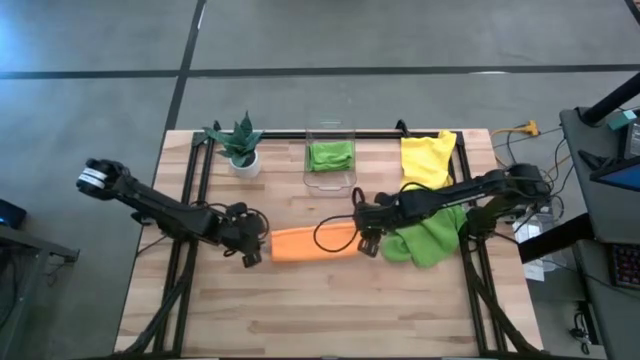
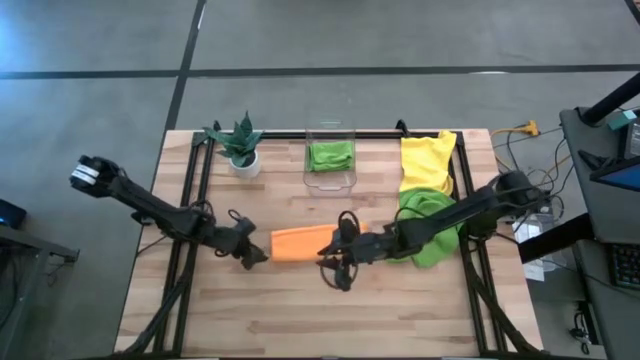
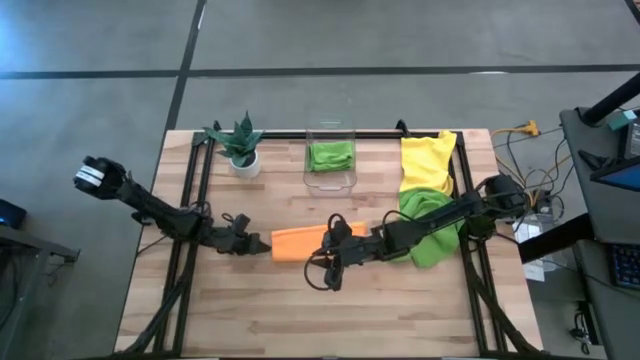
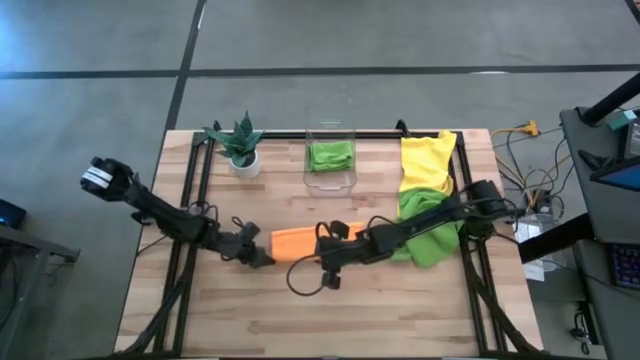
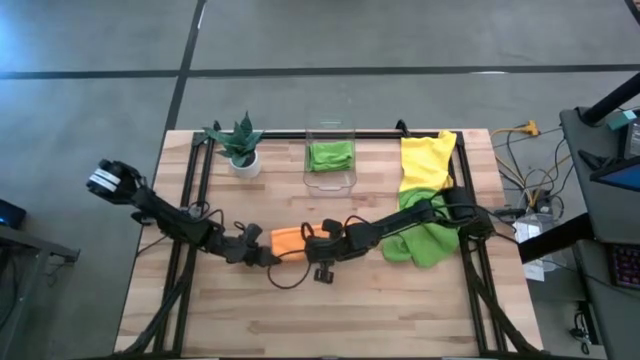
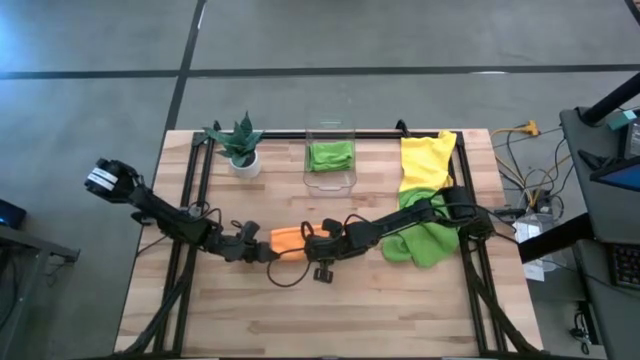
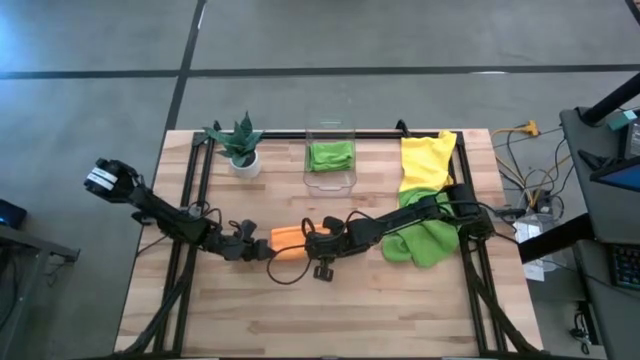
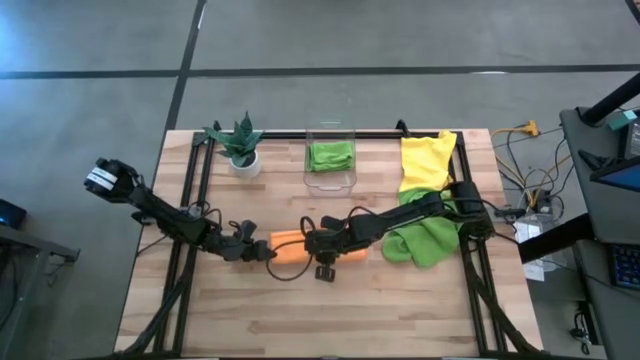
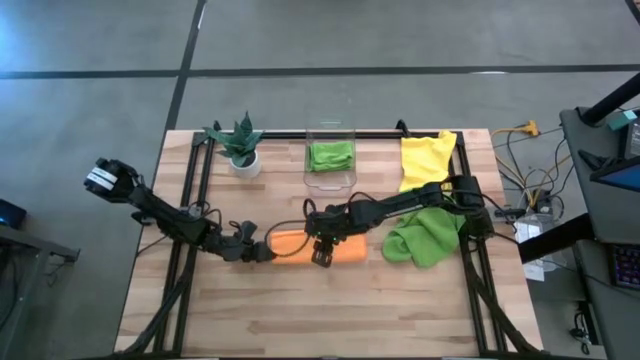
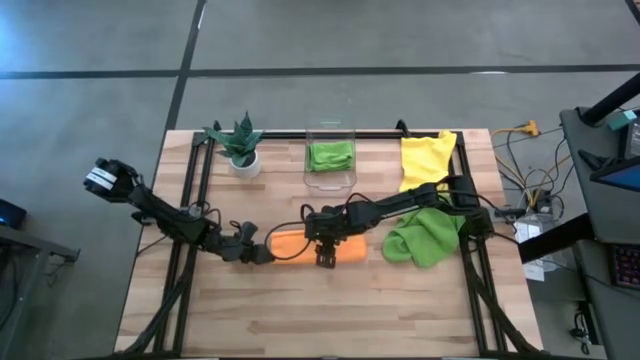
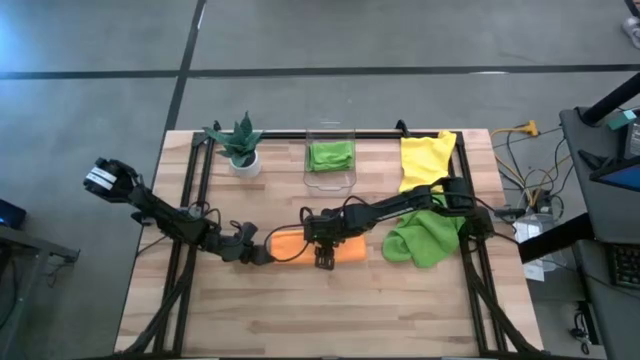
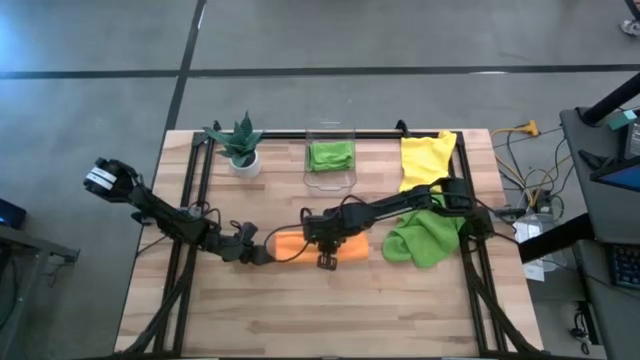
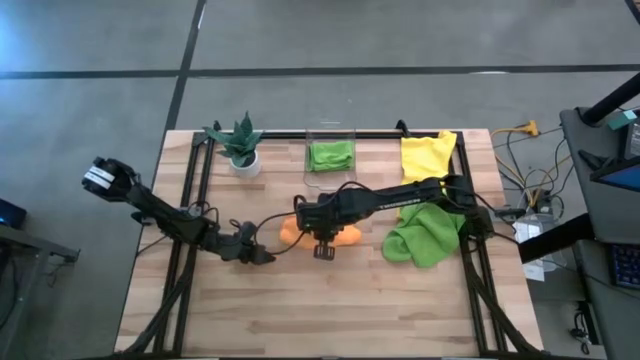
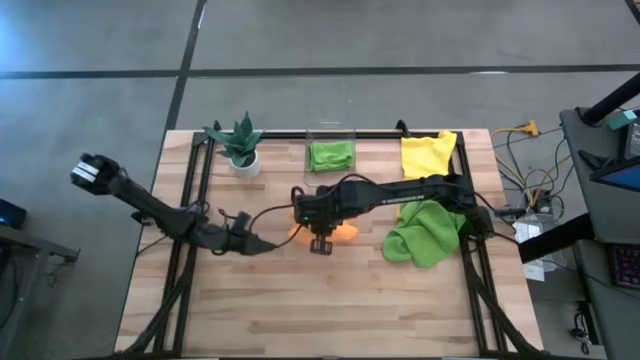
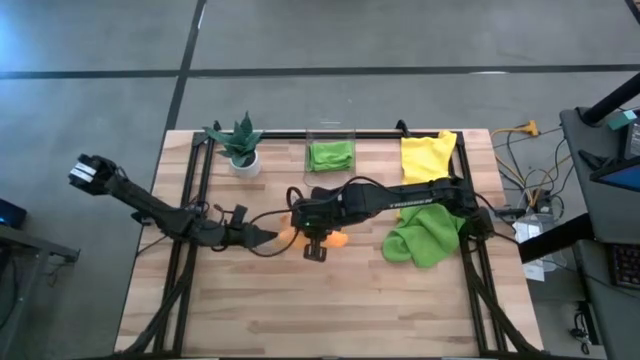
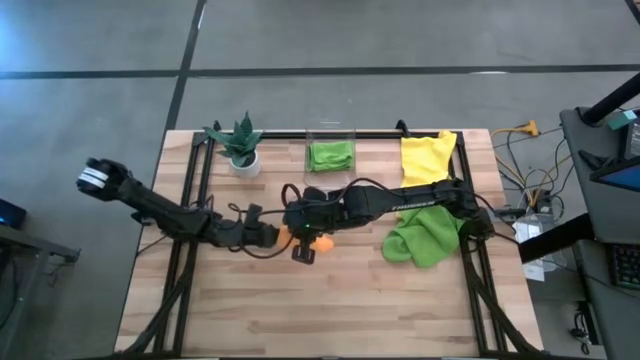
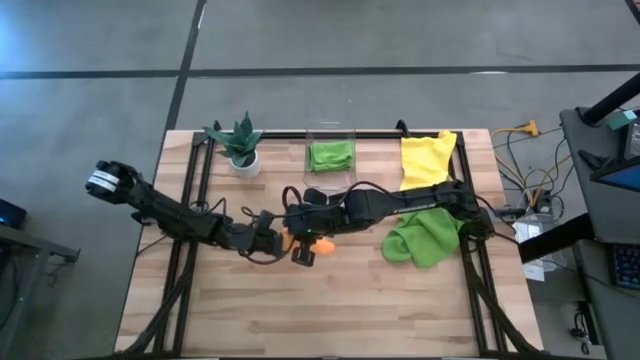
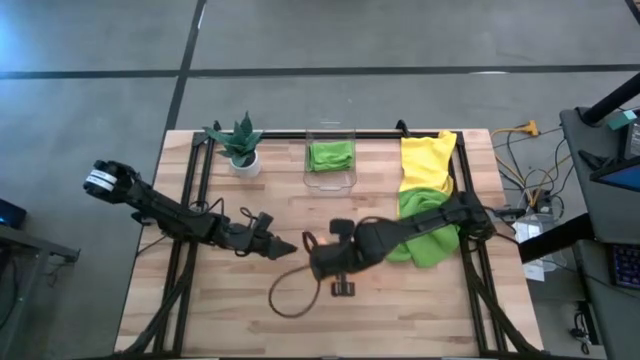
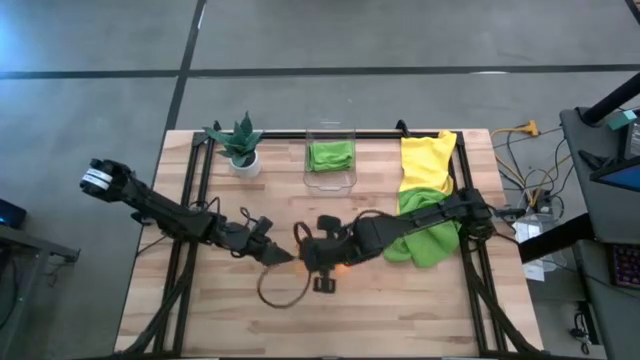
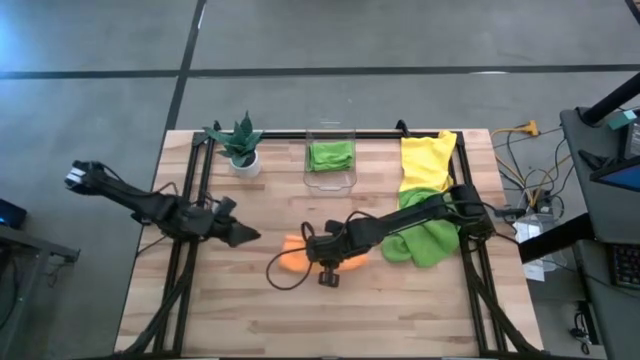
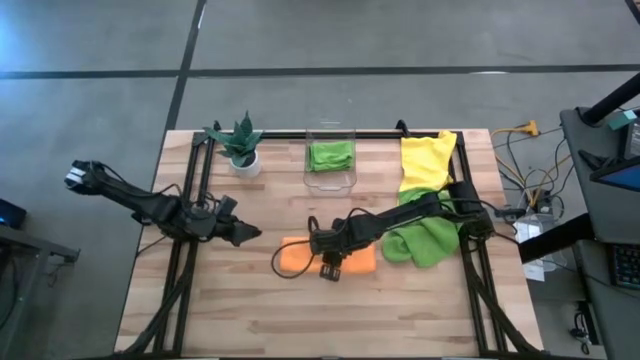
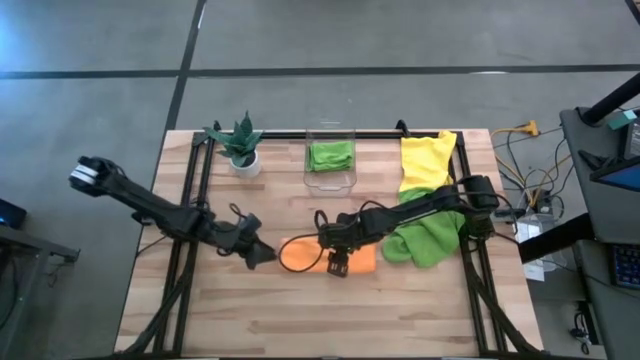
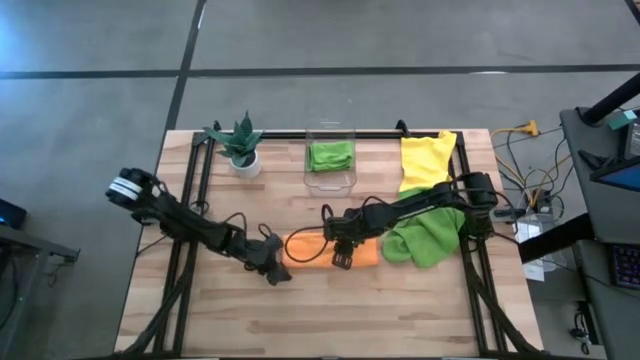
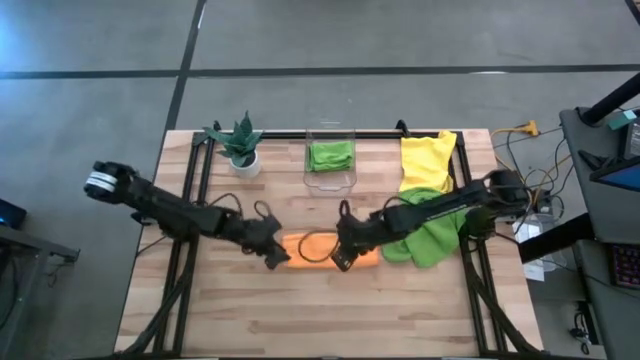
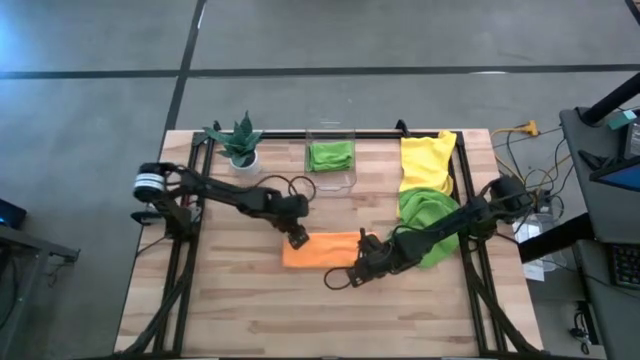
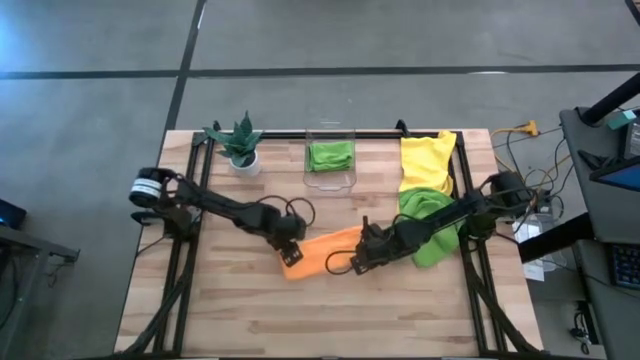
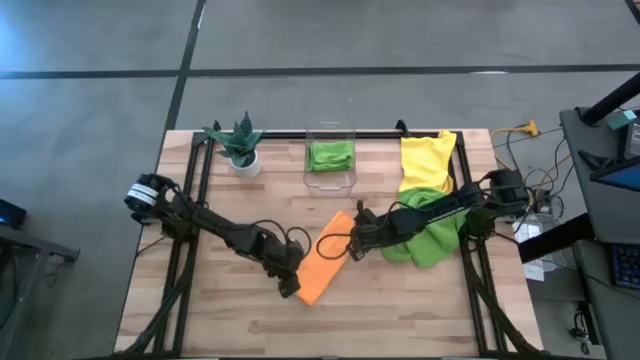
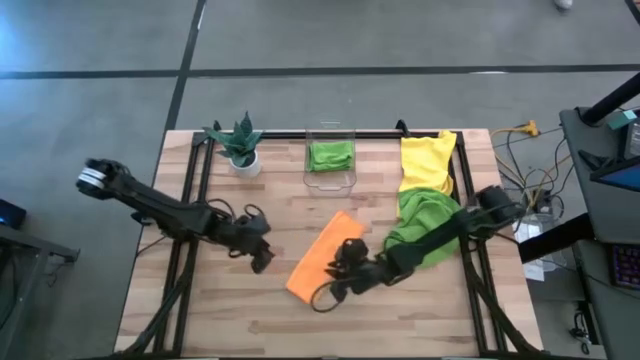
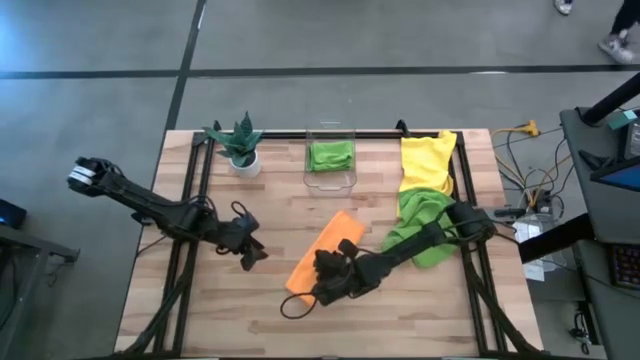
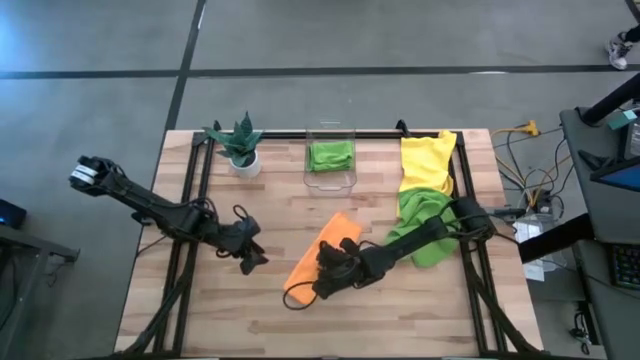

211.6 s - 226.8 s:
Task: Fold microfiber towels
Put the folded orange towel into the transparent bin

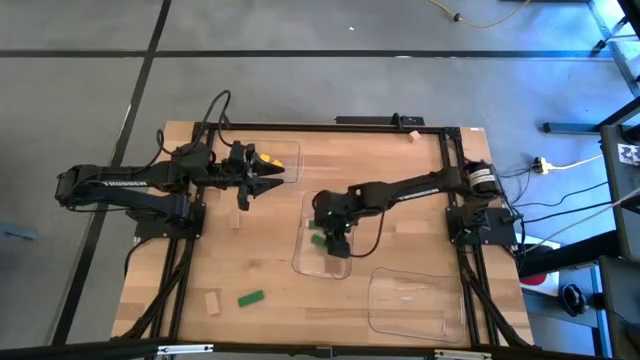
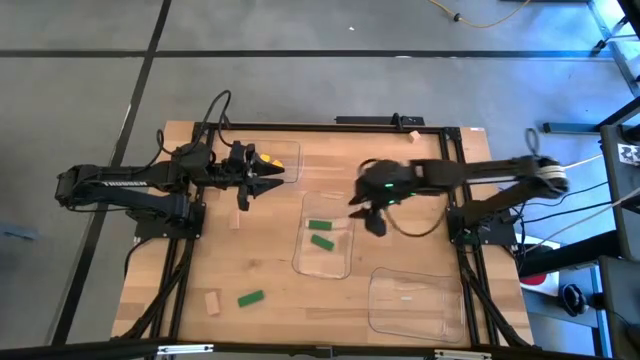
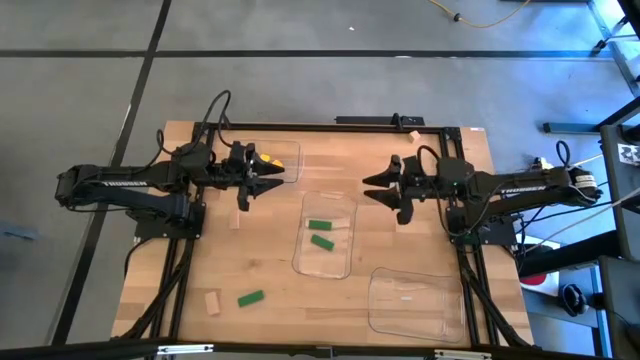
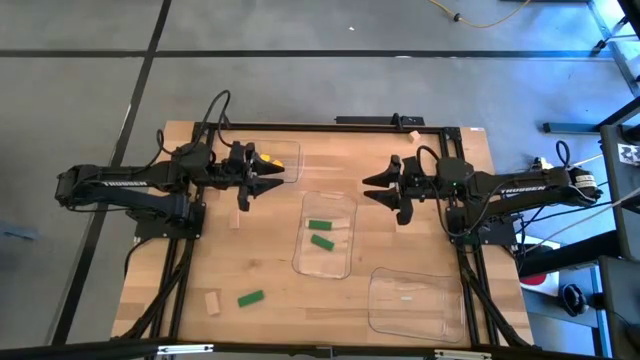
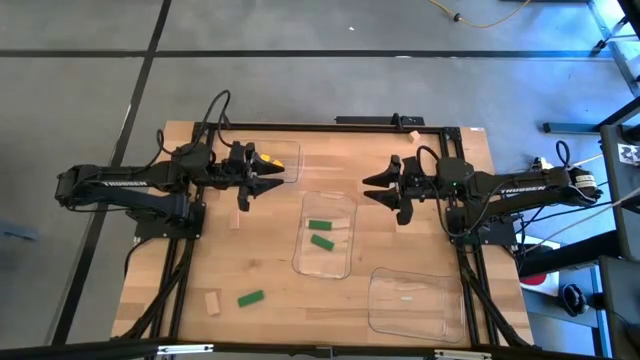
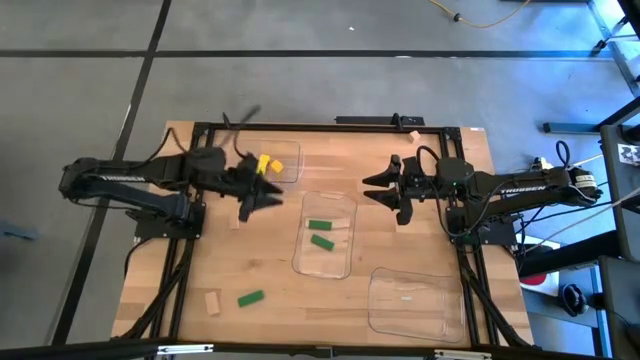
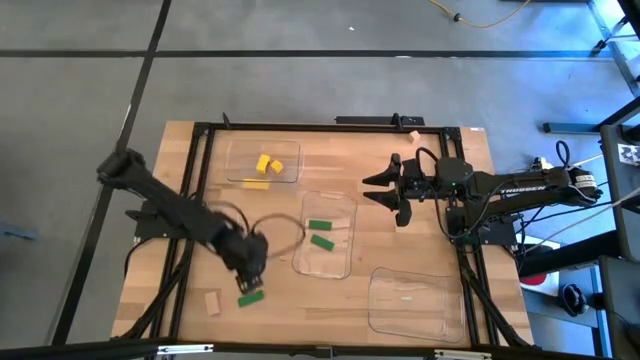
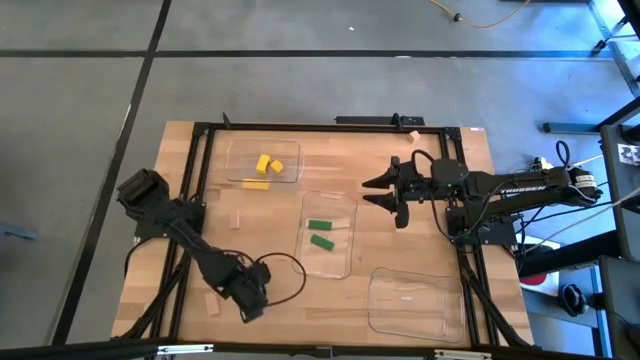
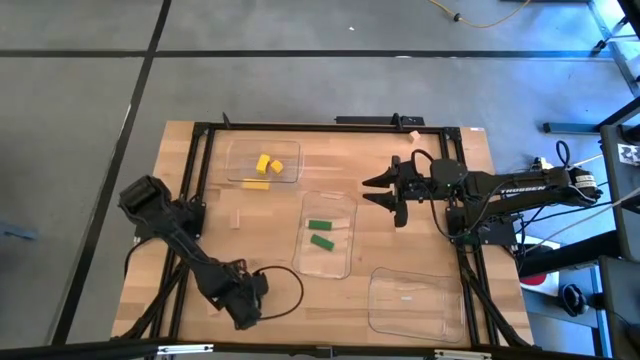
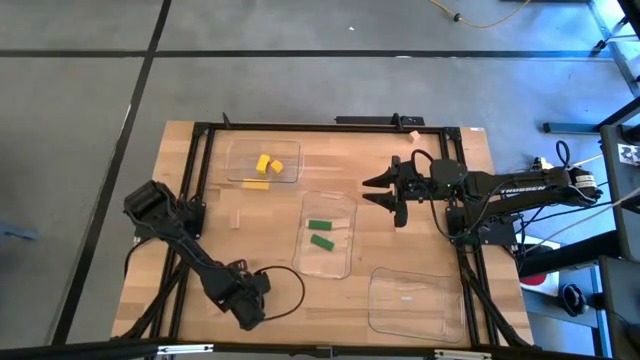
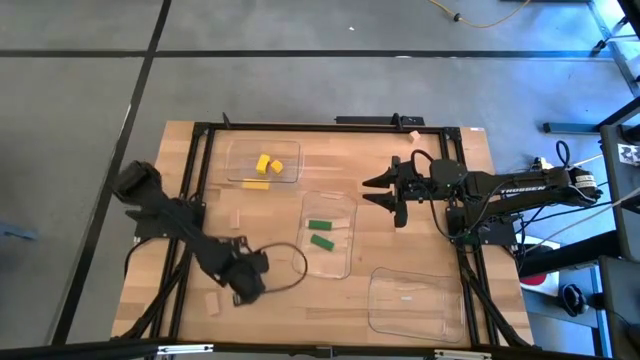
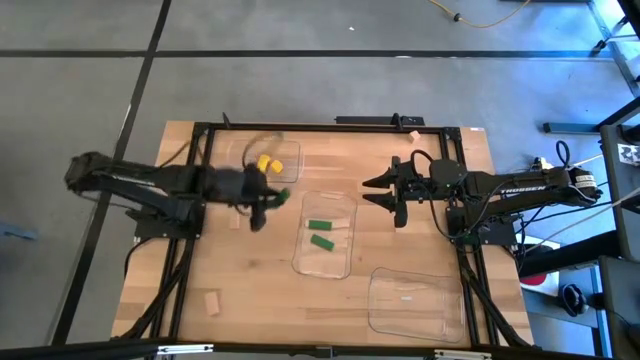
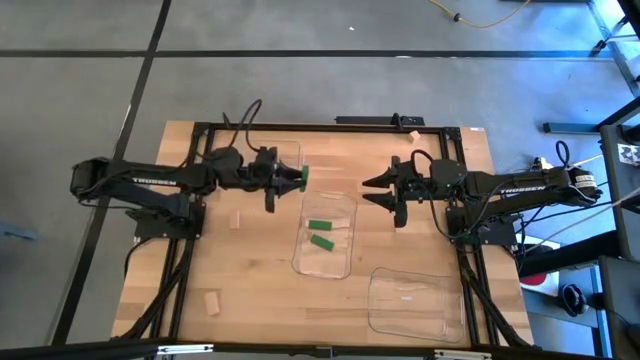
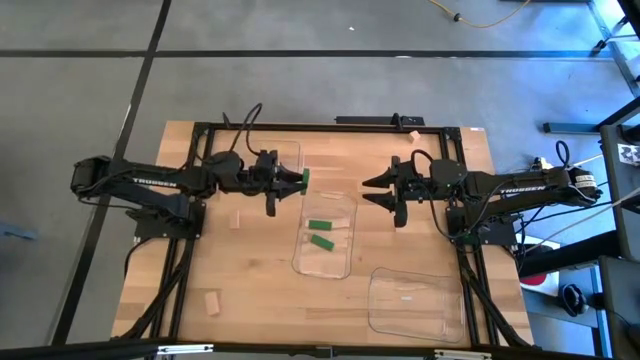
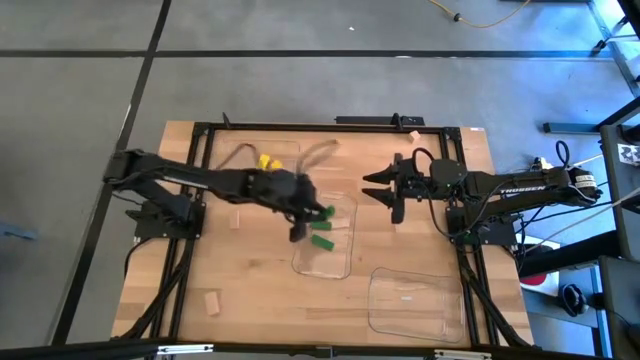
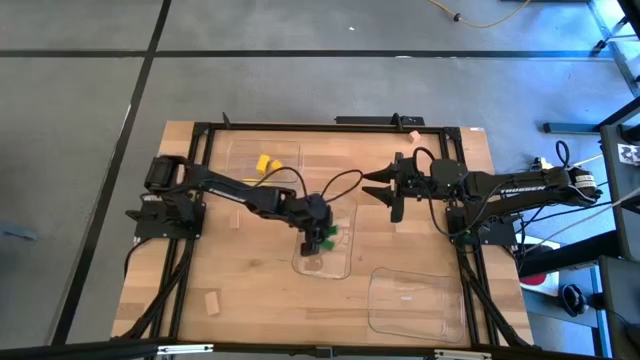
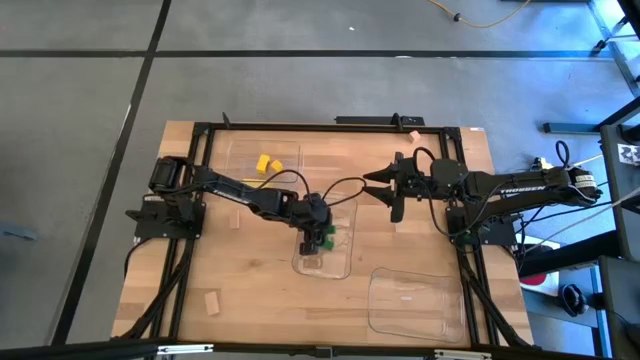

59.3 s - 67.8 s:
Task: Sort & place blocks by color
Put the green block into the middle transparent bin
